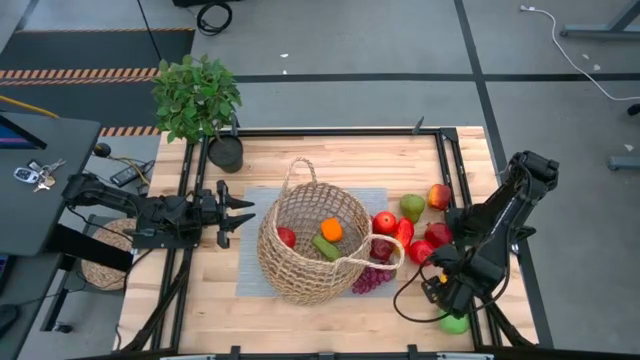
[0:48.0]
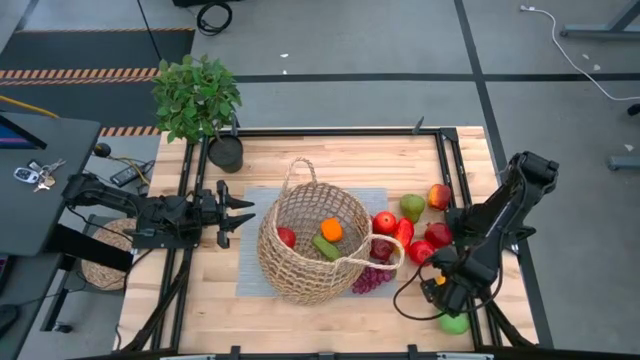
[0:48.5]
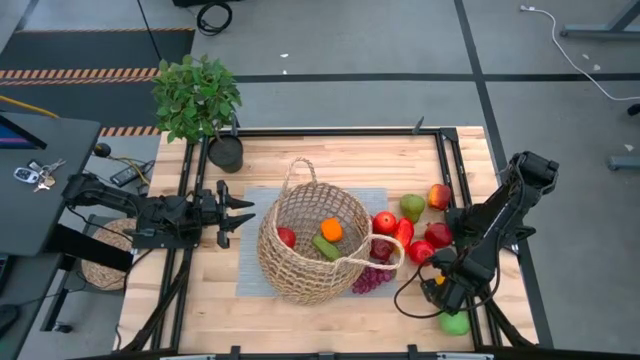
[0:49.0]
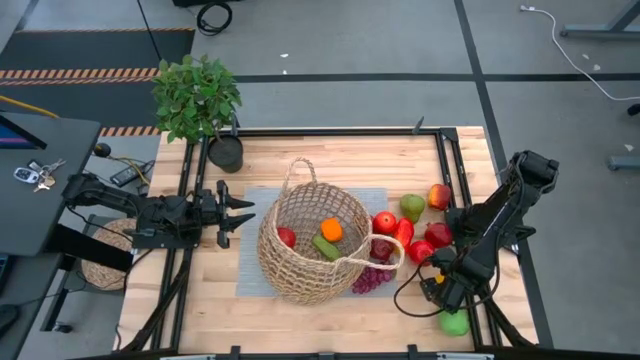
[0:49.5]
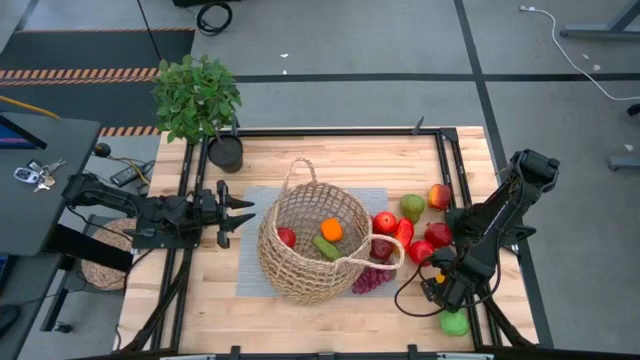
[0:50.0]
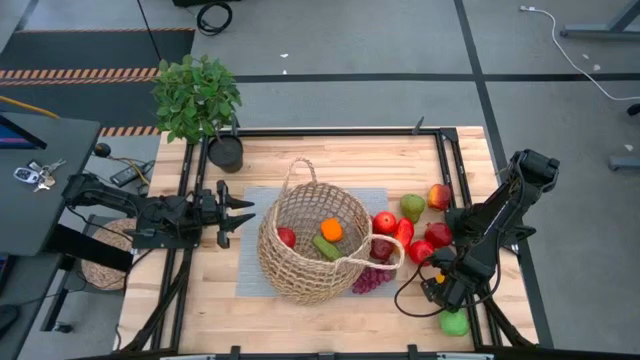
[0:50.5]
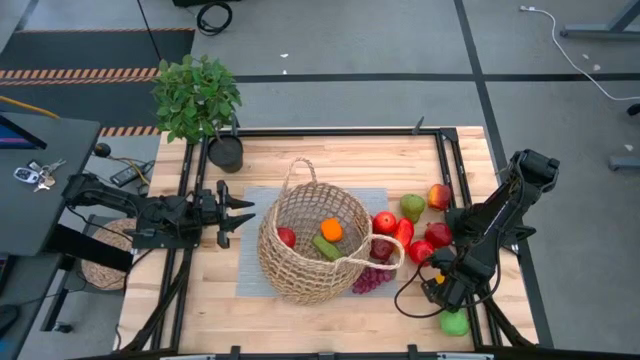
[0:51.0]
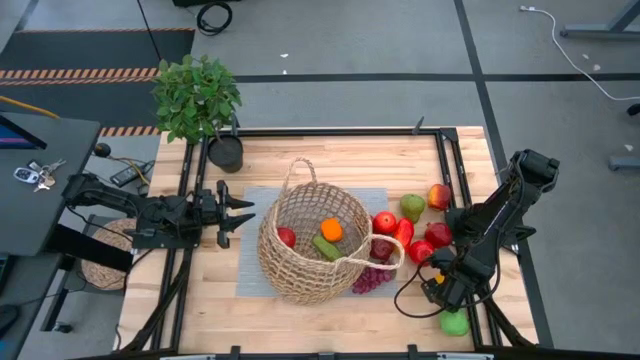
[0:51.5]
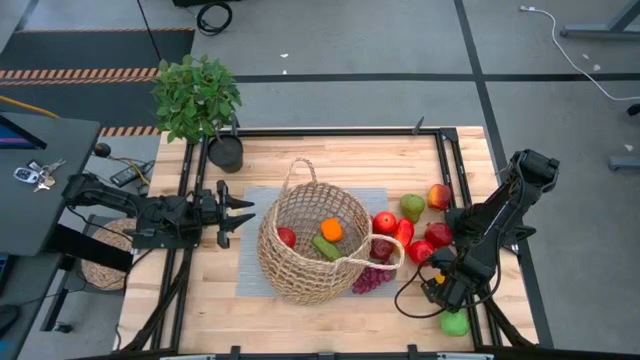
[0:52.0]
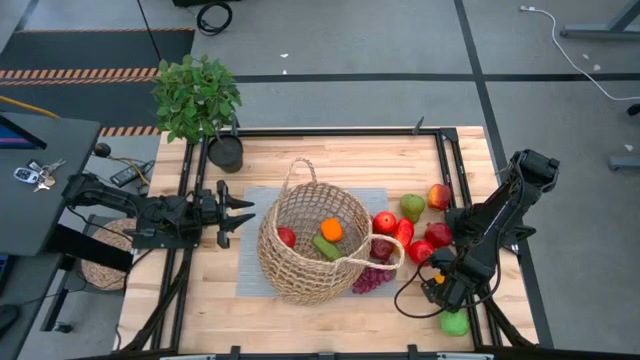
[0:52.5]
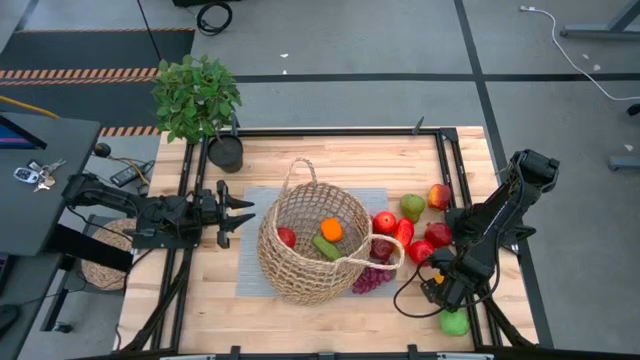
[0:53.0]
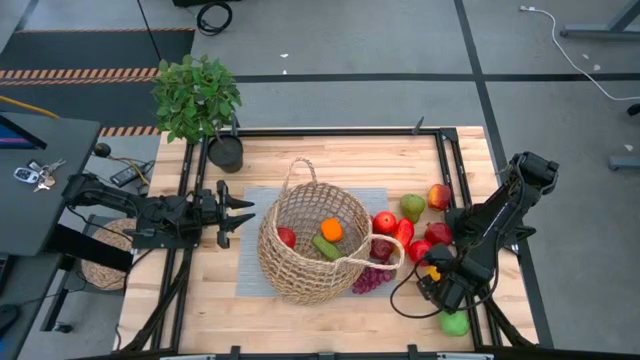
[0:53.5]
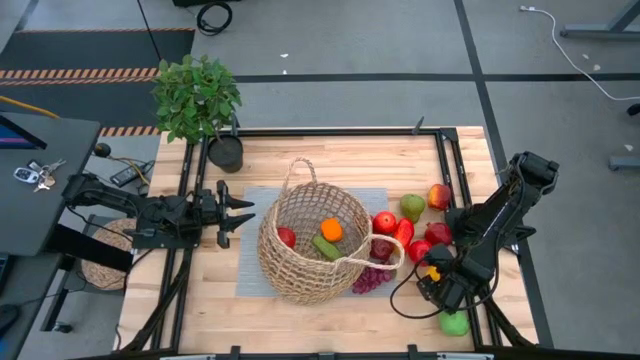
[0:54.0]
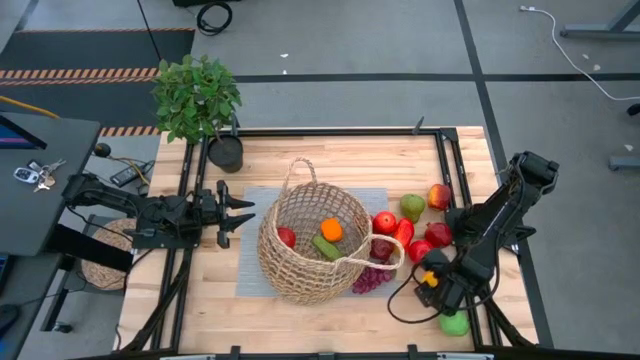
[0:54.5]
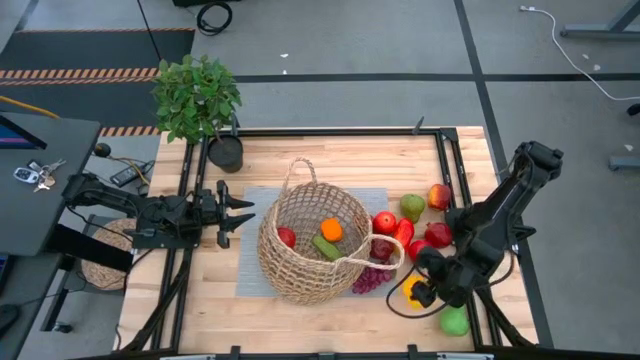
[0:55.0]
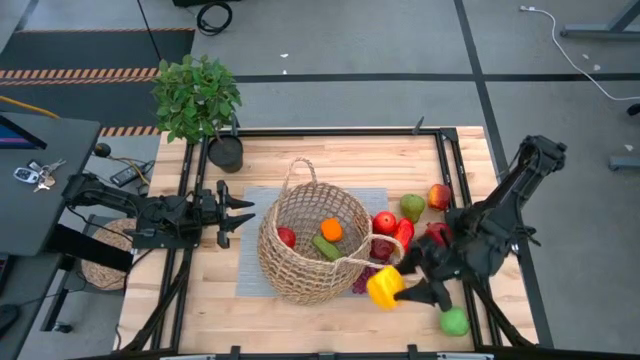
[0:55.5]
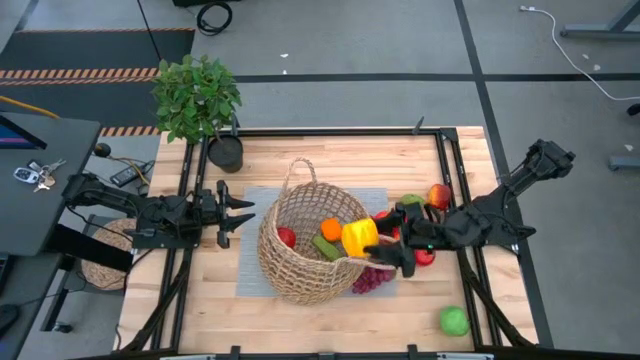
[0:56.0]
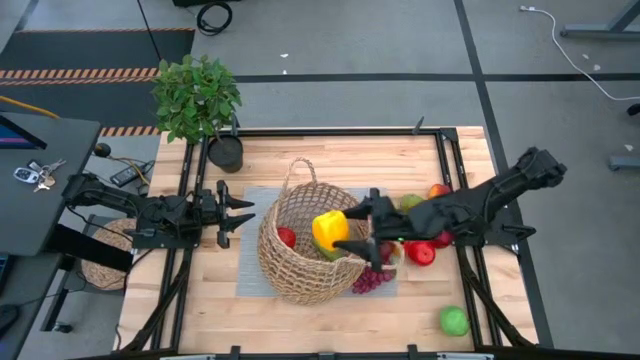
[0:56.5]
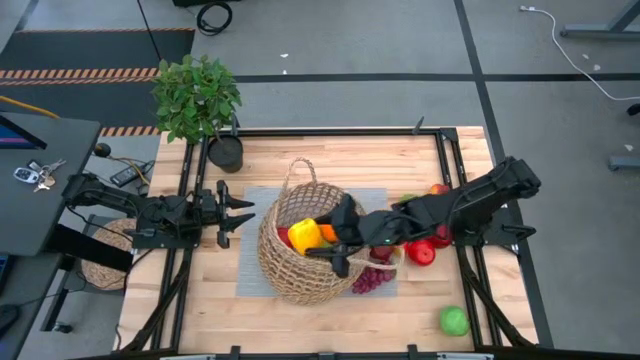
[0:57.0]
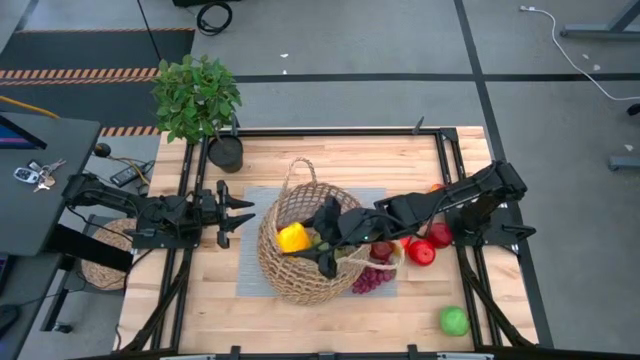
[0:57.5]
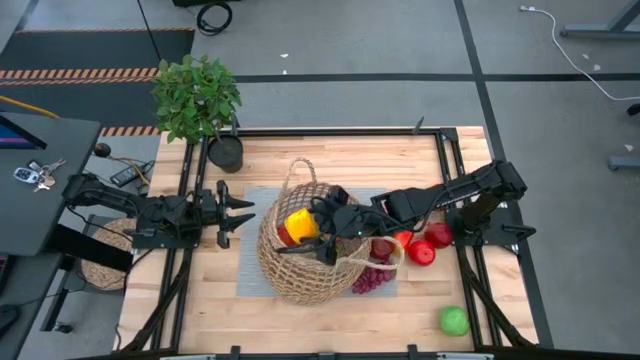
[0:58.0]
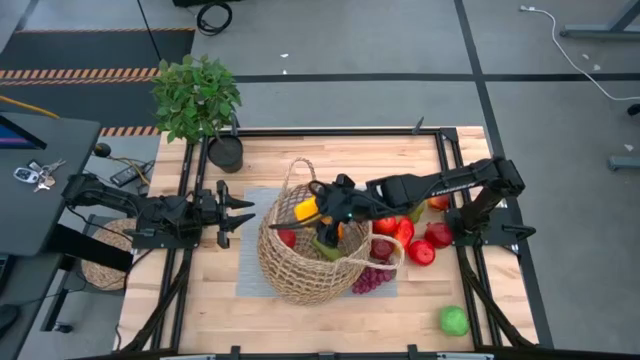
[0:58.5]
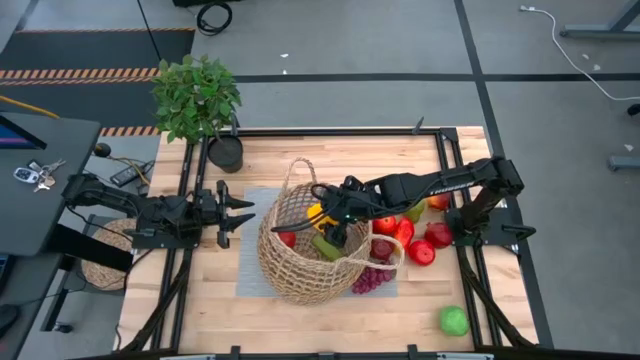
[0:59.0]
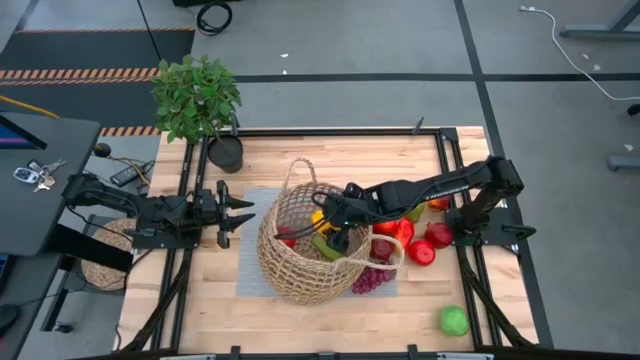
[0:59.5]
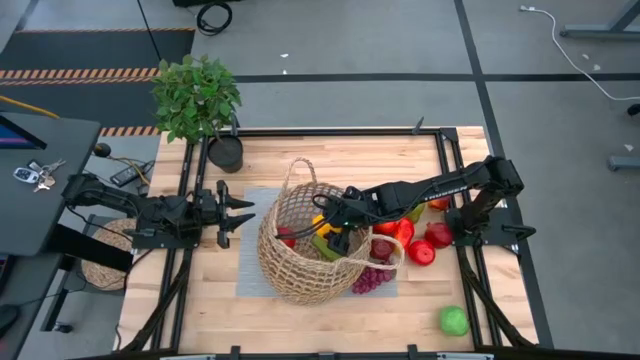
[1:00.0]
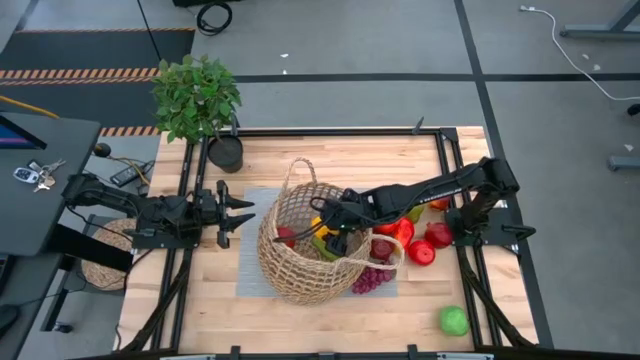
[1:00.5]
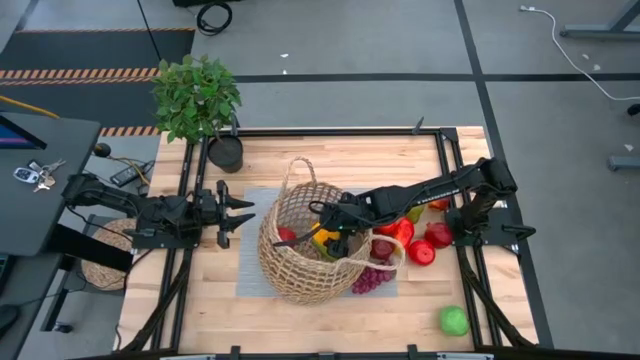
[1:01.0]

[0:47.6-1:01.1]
Task: Build produce basket
Put the bell pepper into the basket

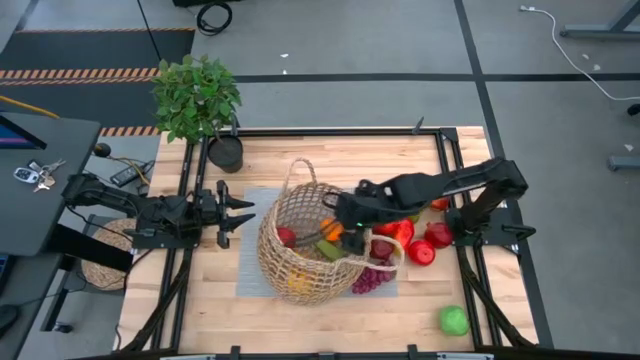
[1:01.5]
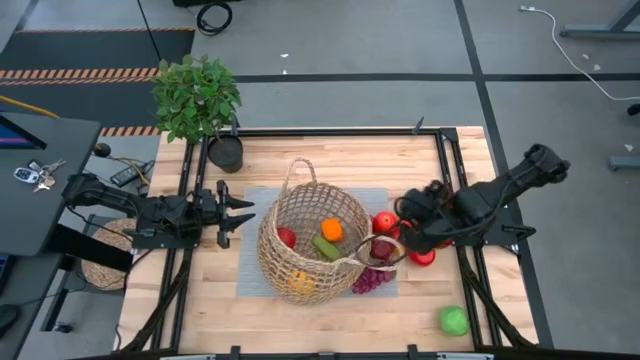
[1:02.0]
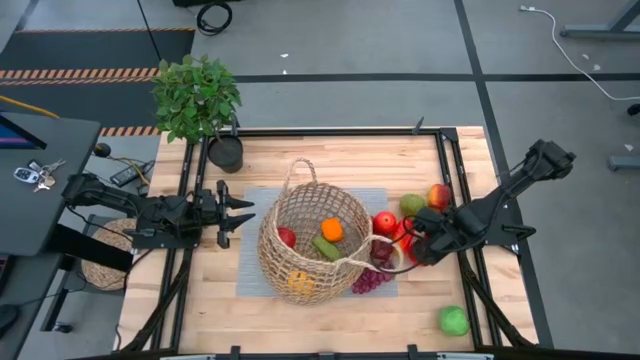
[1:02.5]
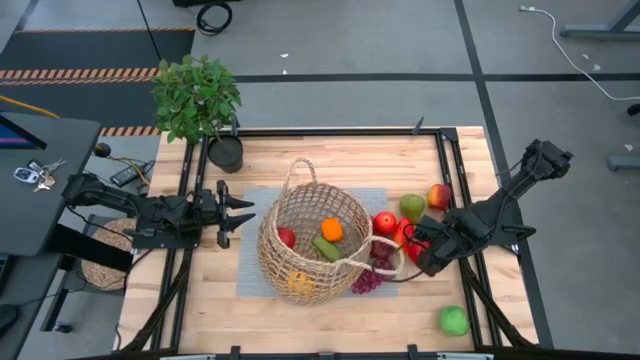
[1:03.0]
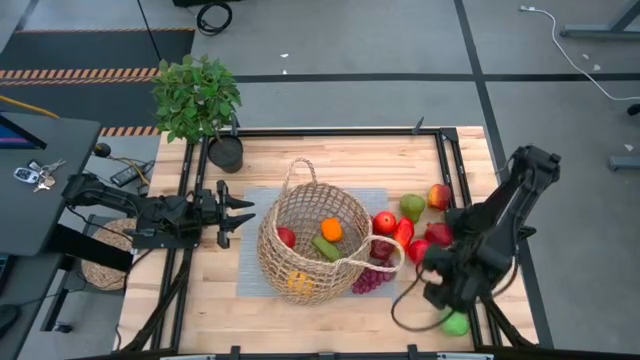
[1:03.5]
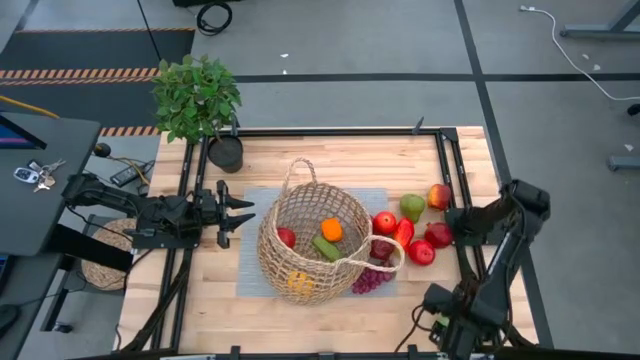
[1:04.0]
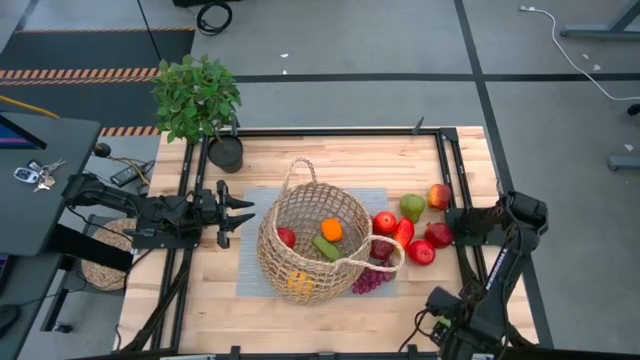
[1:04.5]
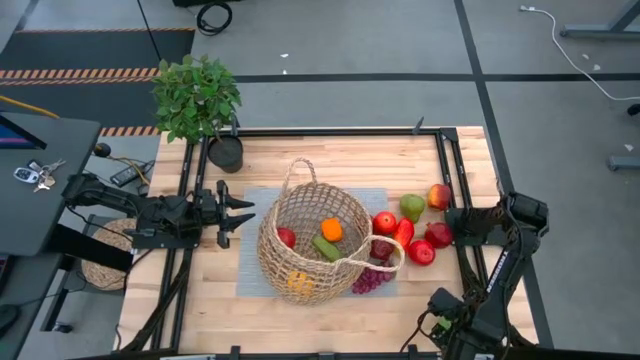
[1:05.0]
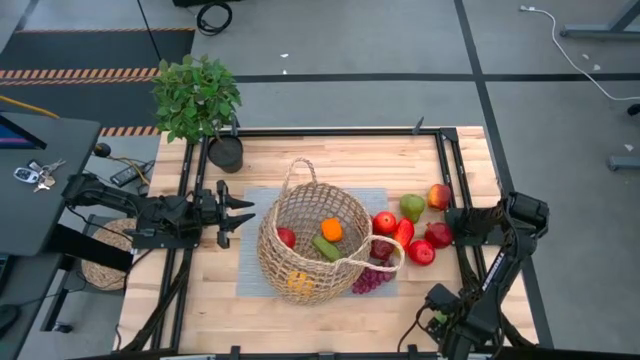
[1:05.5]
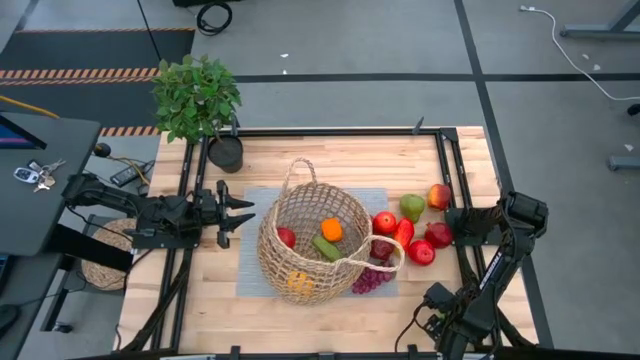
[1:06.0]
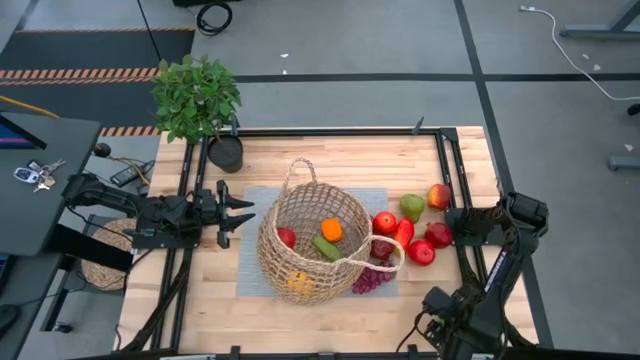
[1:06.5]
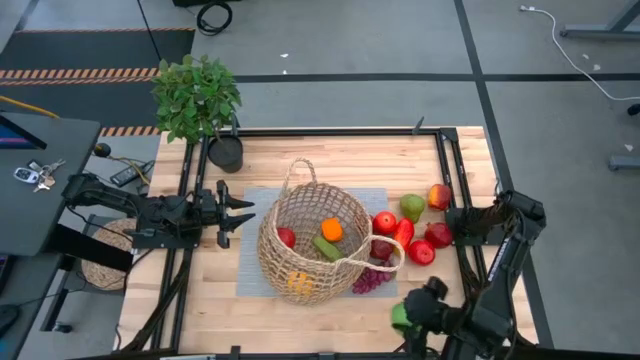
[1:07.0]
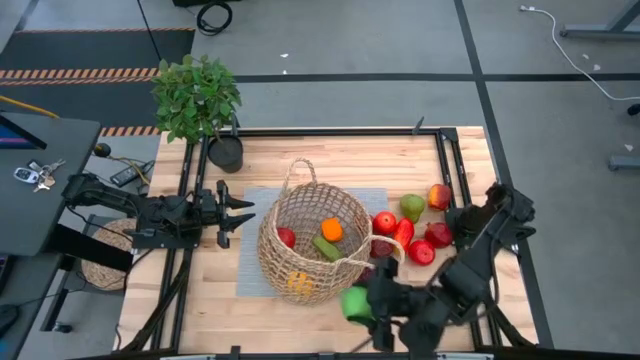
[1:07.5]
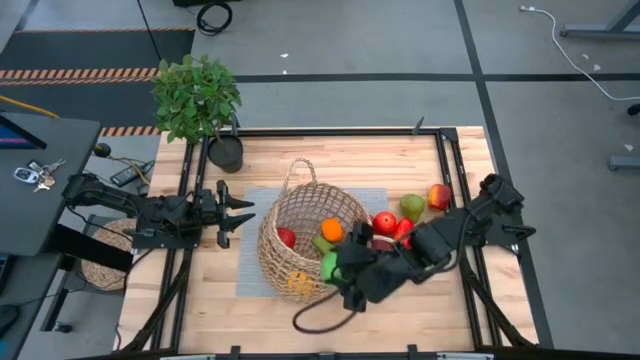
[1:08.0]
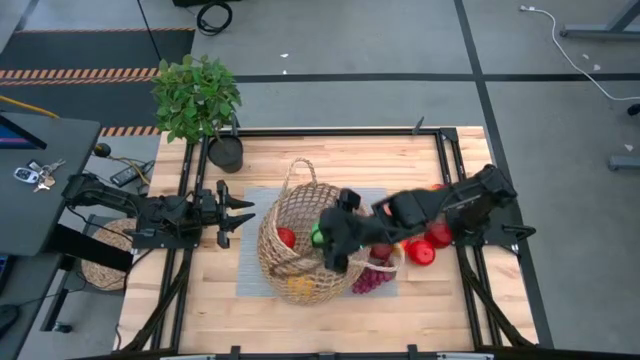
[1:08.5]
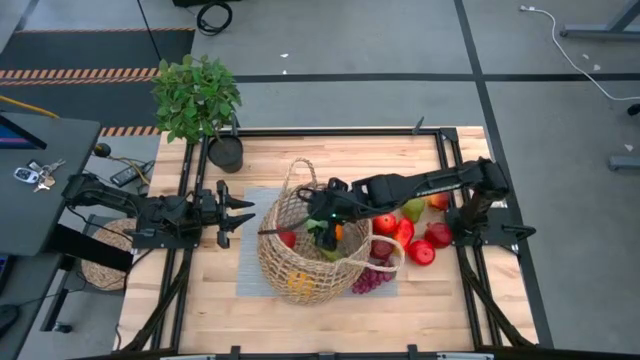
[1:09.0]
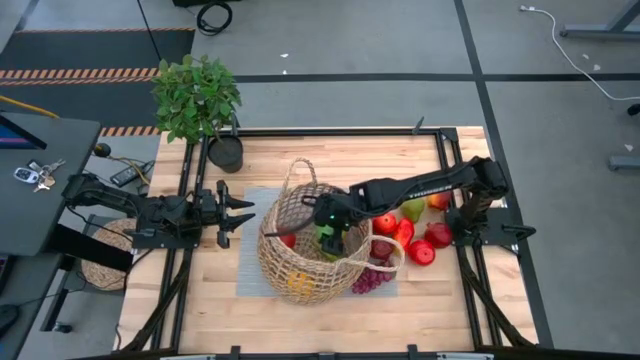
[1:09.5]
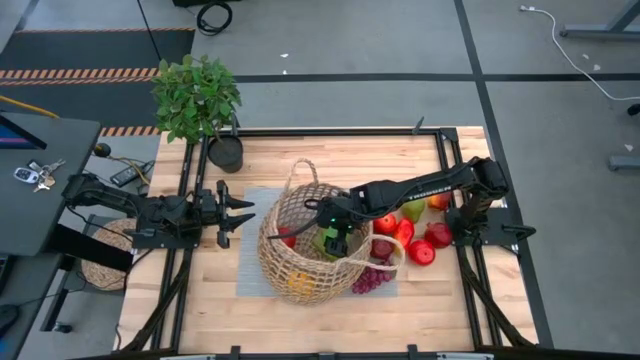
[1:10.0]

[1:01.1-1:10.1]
Put the green apple into the basket
